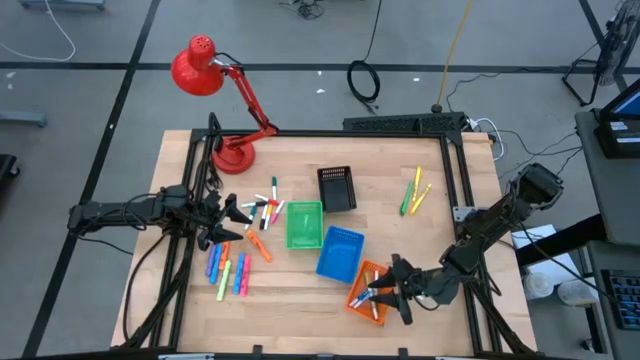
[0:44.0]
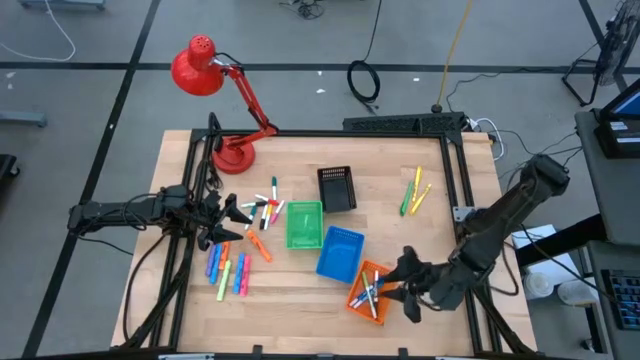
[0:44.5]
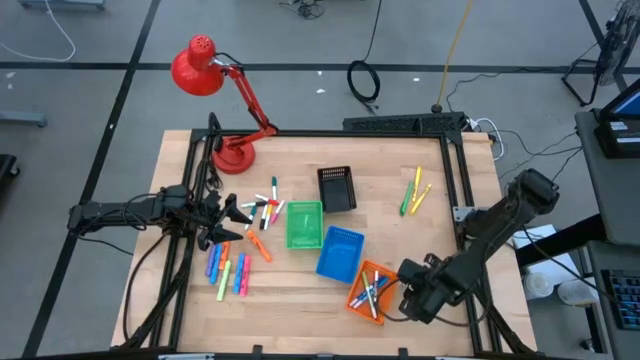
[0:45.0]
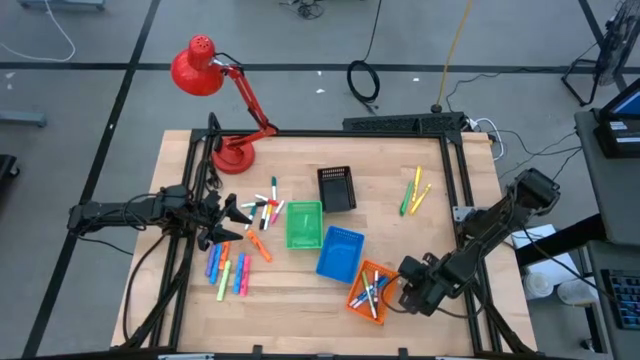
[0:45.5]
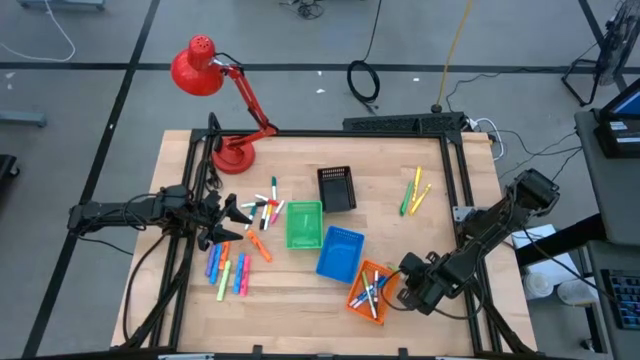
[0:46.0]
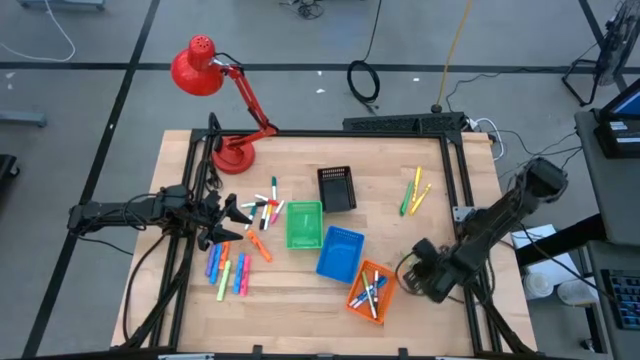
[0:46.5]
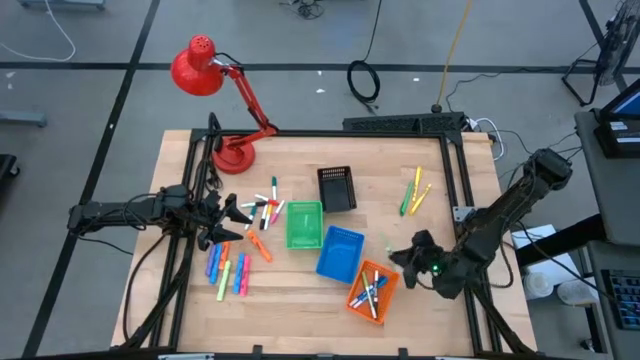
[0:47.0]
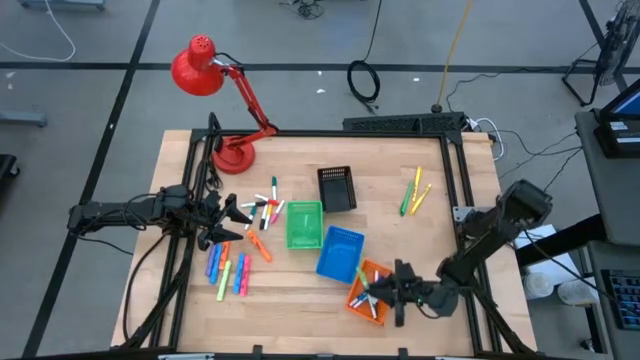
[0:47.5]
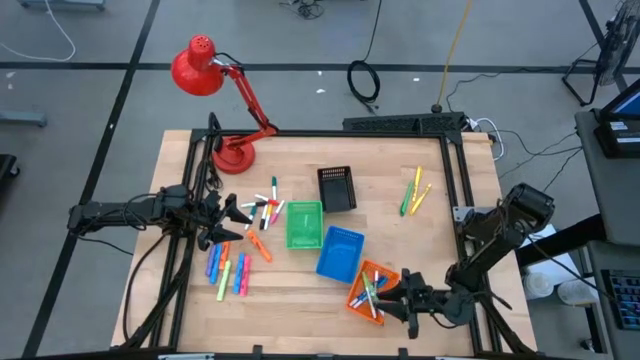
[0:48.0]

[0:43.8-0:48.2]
Task: Pick & Place Markers
Put the green marker pen into the orange basket

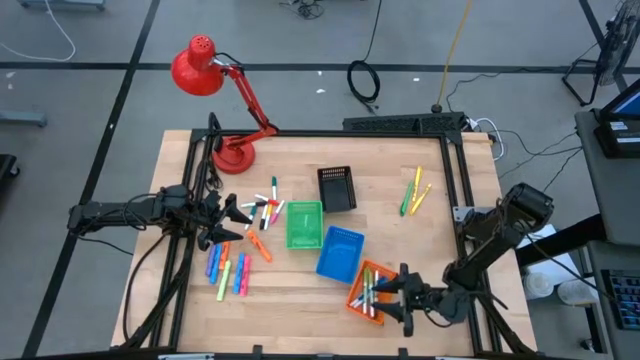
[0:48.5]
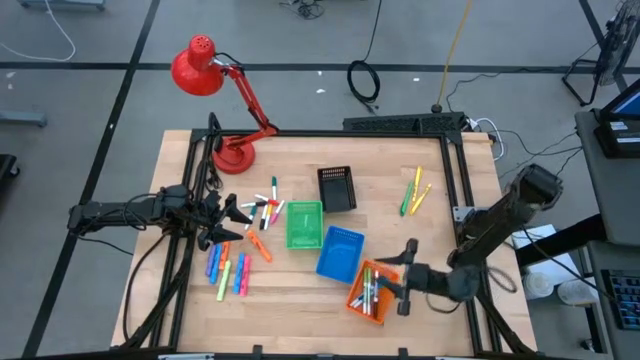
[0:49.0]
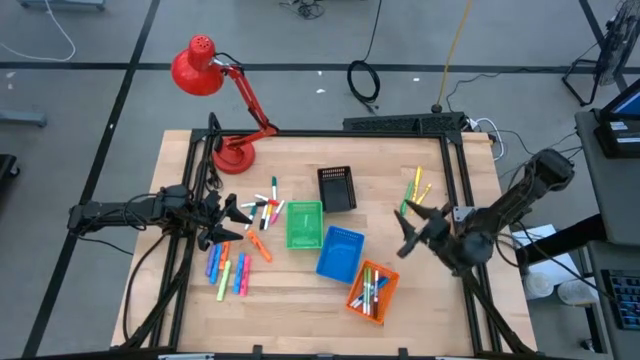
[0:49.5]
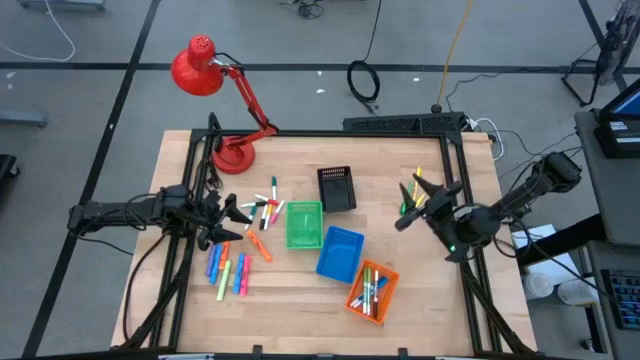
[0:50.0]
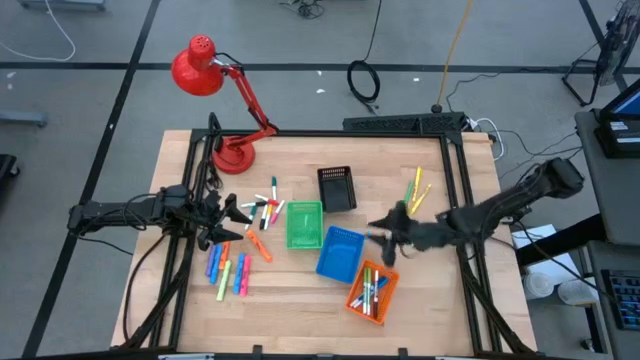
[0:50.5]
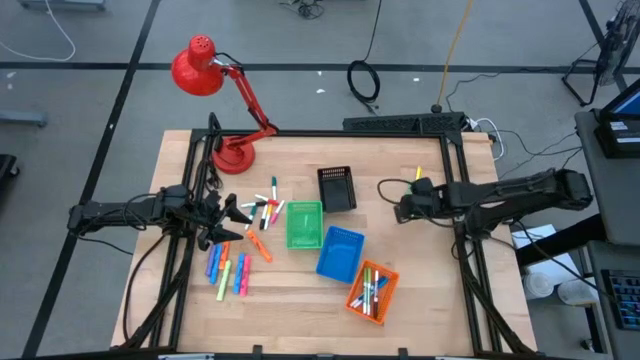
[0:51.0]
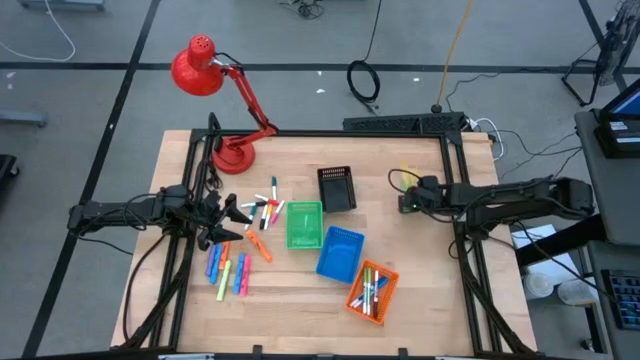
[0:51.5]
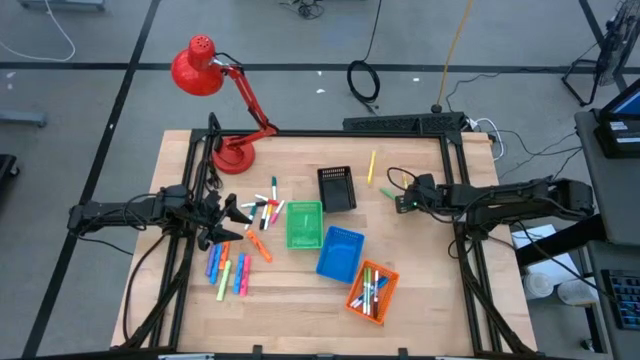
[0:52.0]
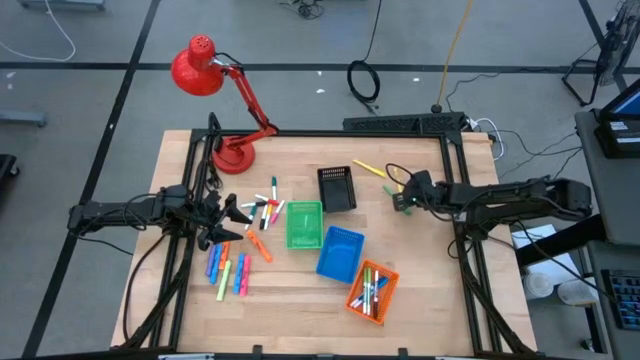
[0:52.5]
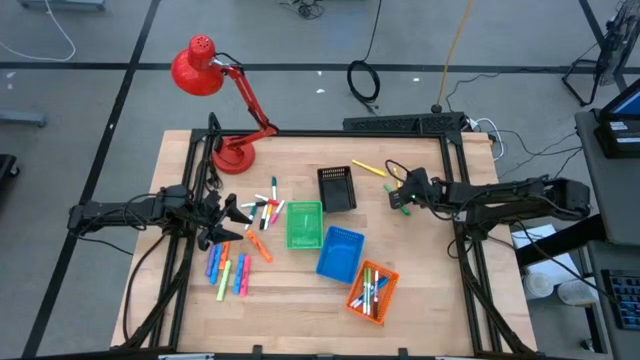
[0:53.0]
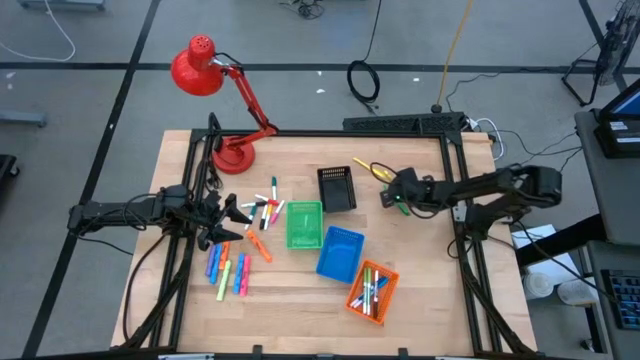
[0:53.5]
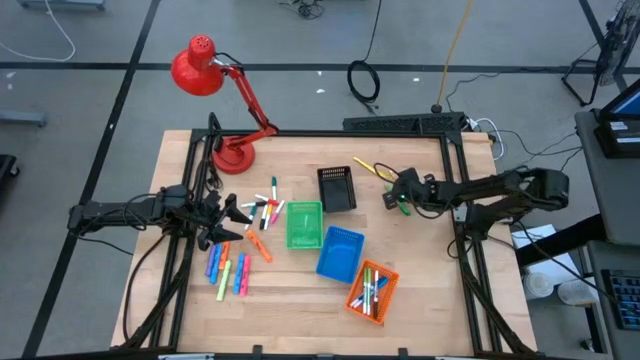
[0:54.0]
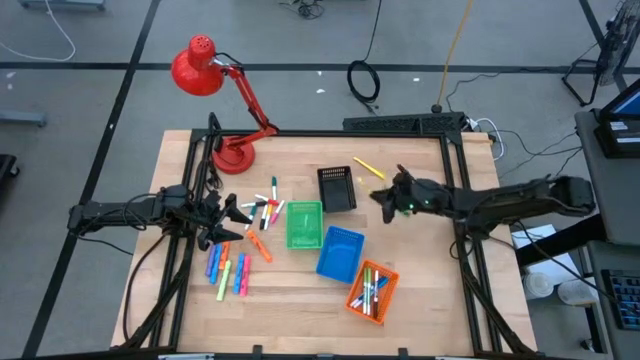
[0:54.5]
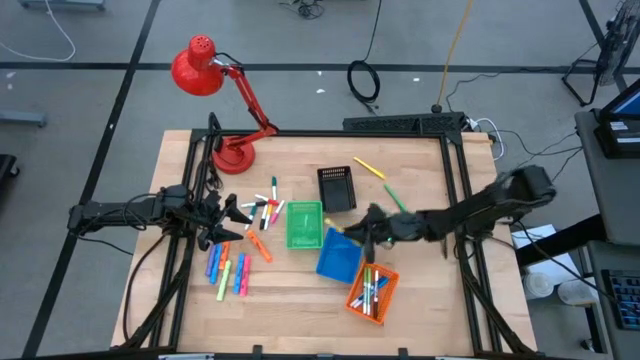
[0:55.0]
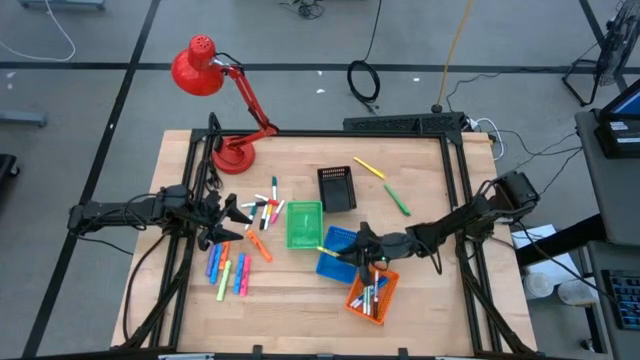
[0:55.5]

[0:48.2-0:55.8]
Put the bottom yellow pen into the blue basket

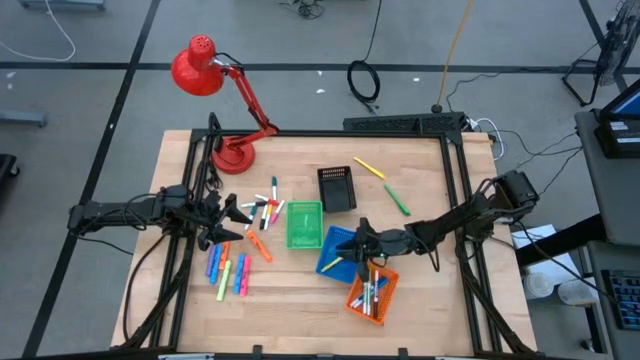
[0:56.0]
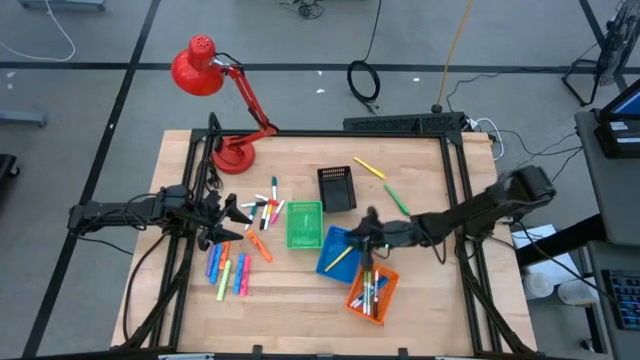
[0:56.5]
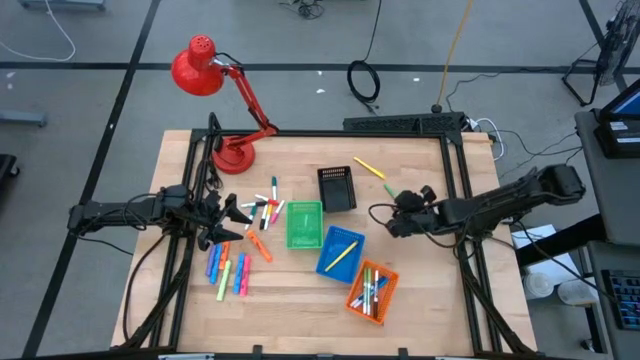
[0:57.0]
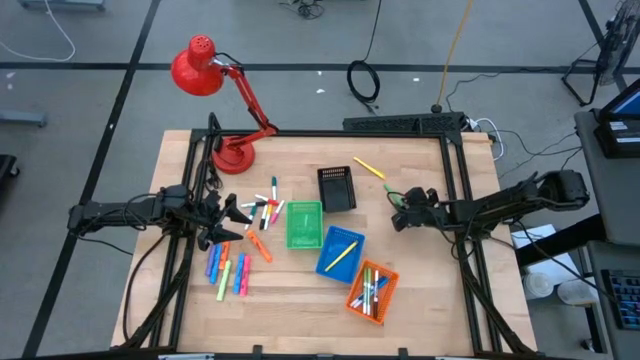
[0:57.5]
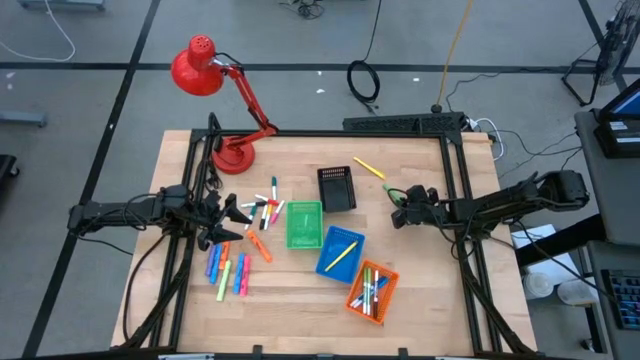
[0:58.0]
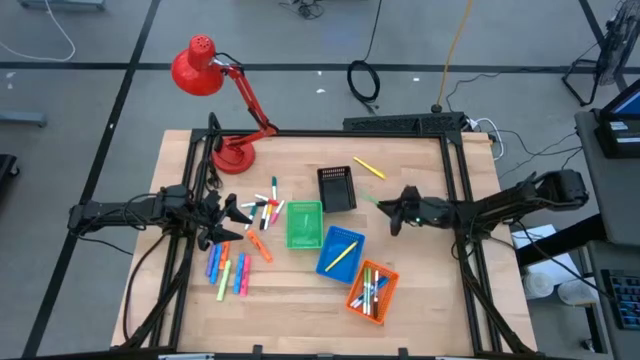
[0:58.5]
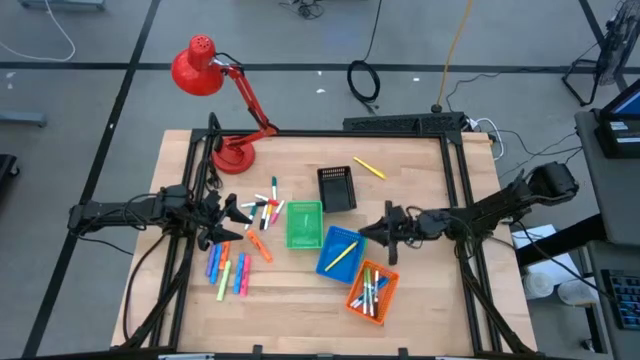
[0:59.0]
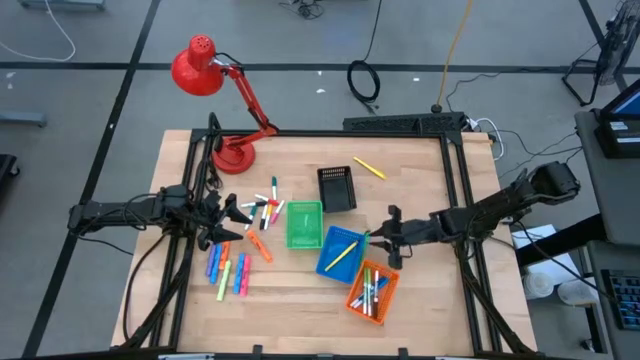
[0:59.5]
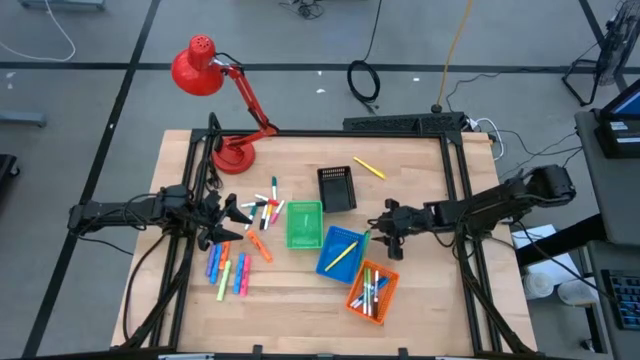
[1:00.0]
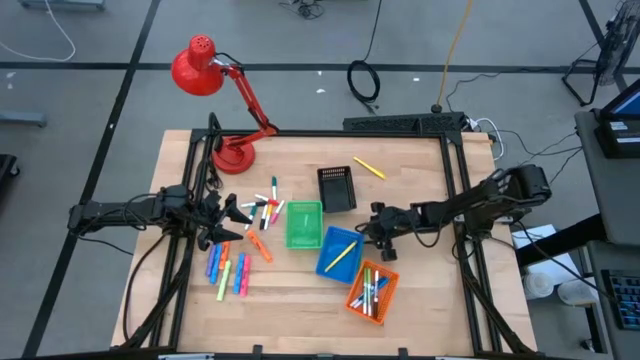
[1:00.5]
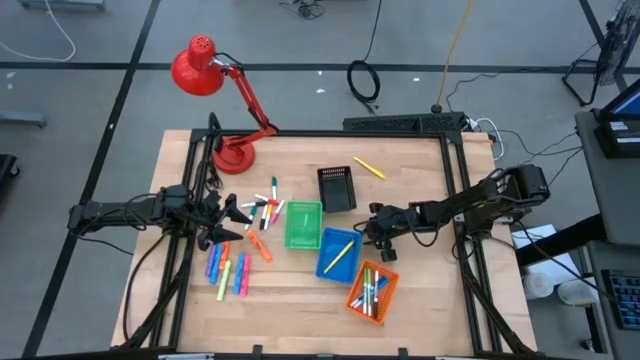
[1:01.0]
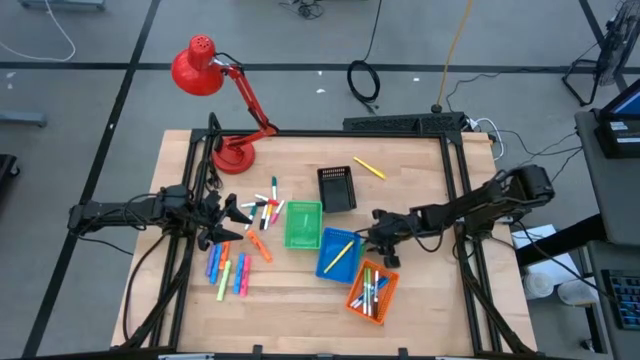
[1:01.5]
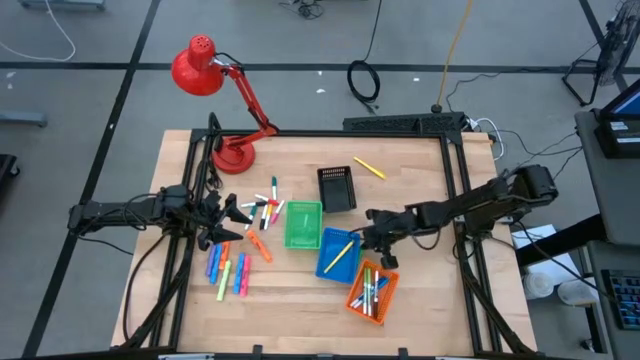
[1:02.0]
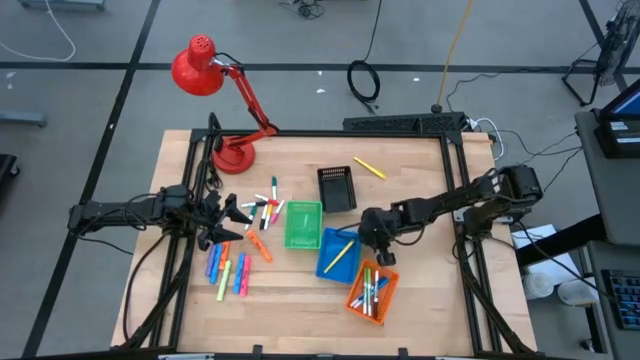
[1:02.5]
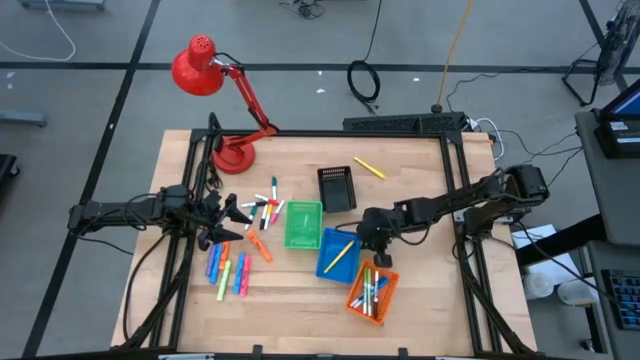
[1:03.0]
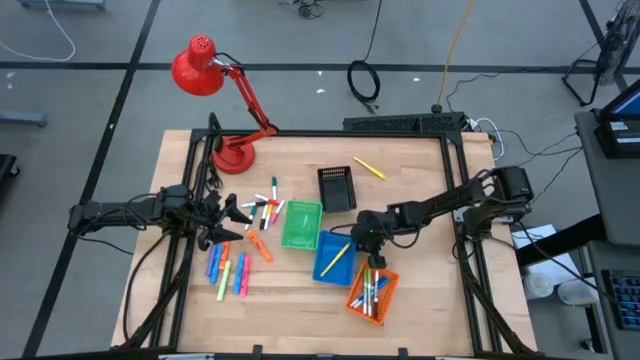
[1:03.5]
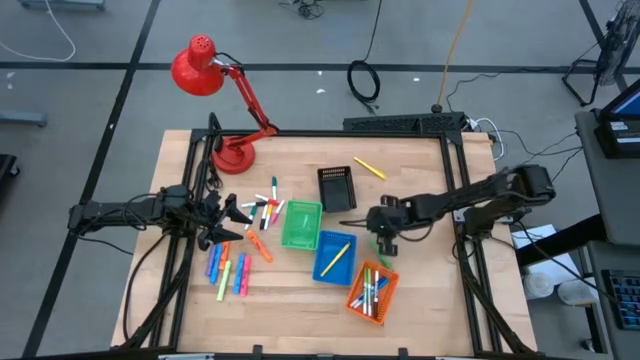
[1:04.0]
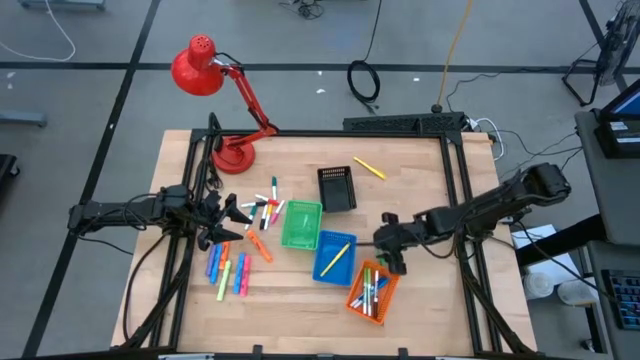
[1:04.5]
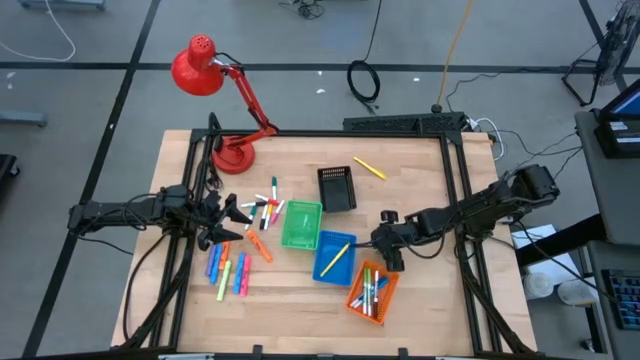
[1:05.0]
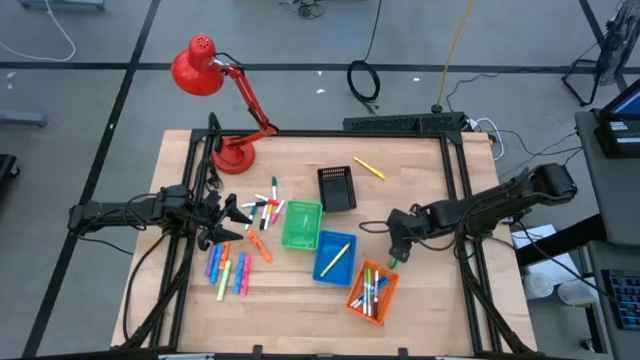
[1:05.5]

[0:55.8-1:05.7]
Put the green pen into the blue basket
